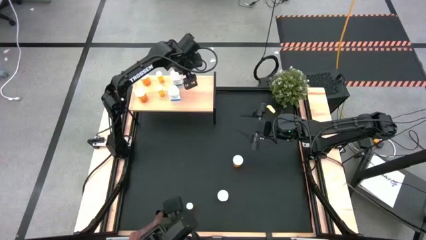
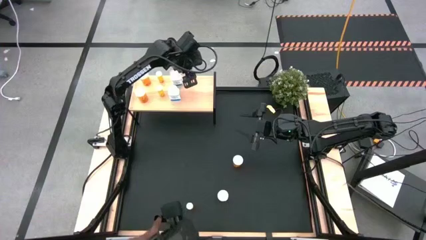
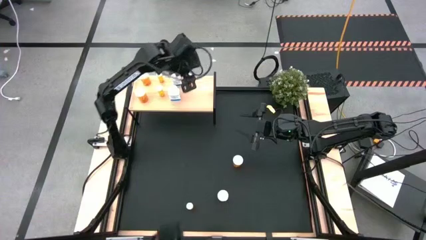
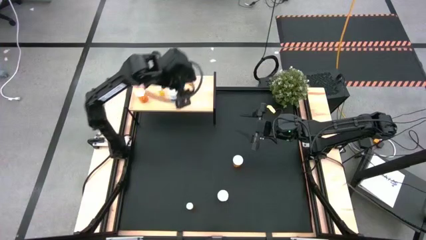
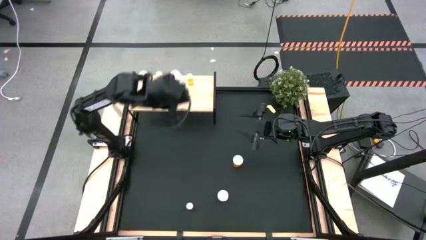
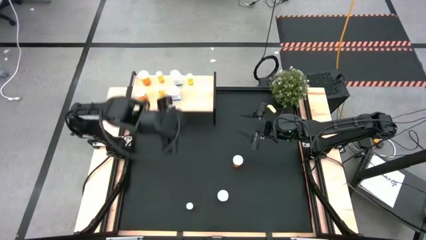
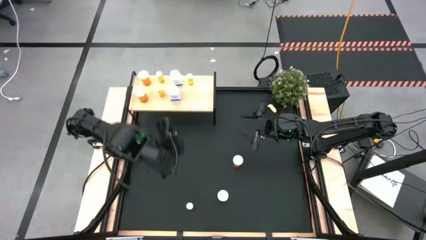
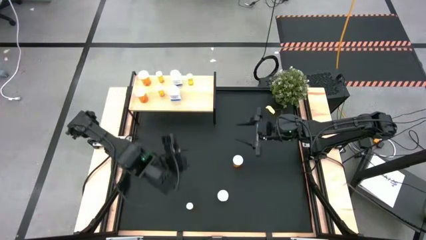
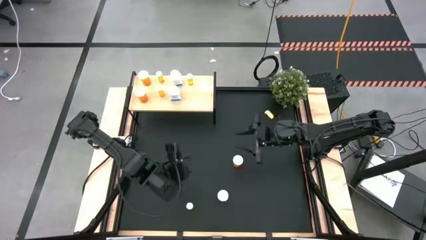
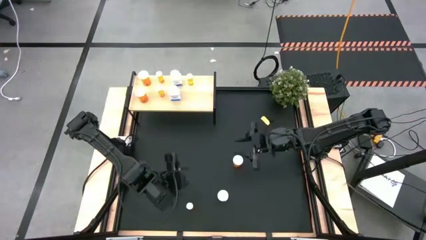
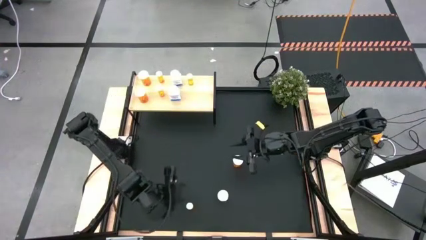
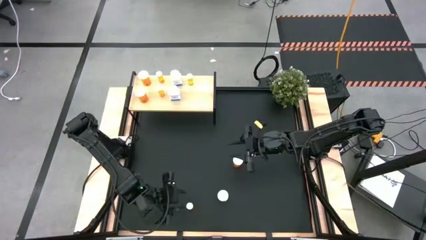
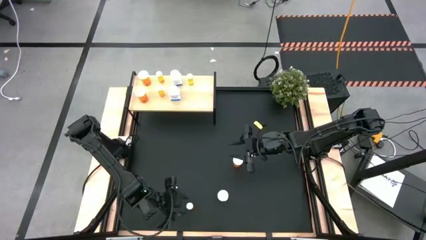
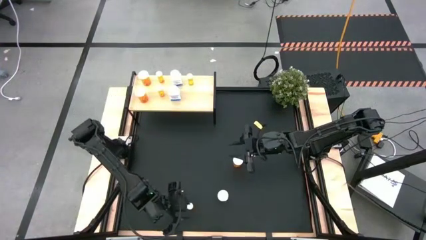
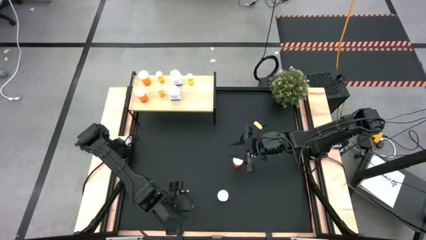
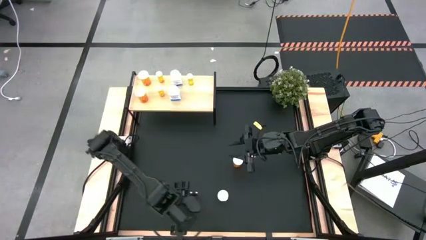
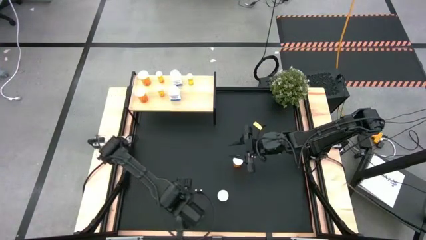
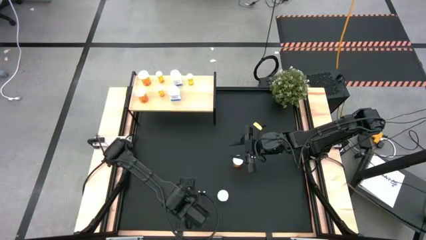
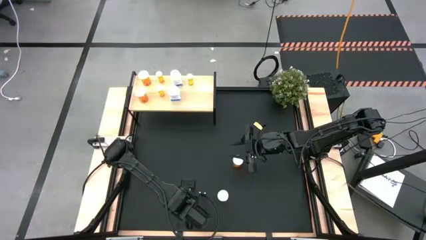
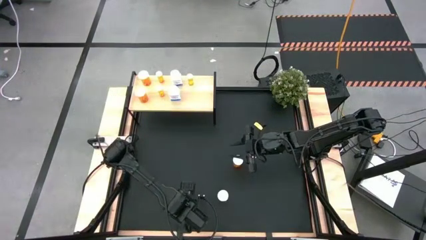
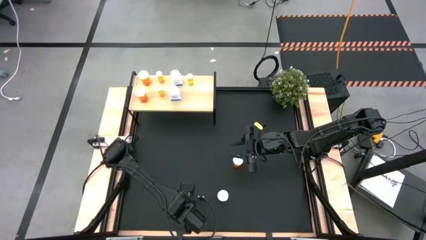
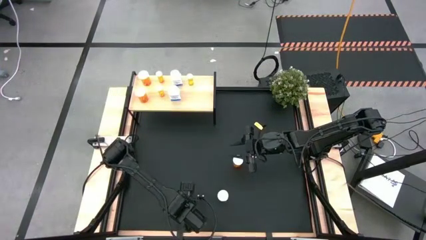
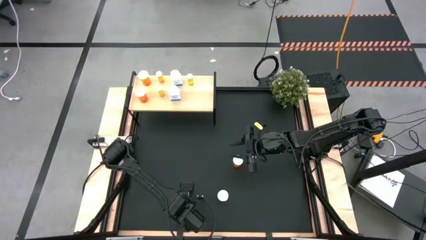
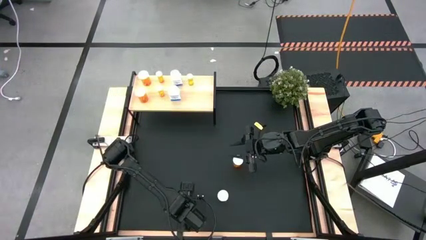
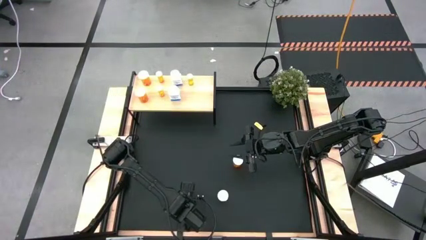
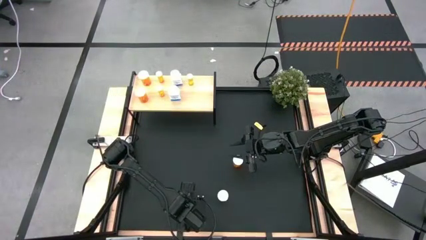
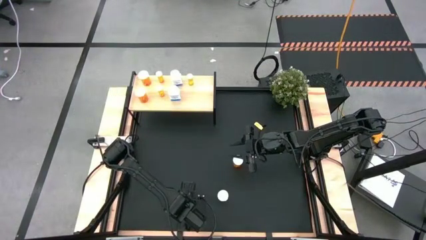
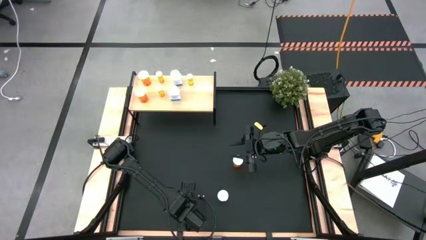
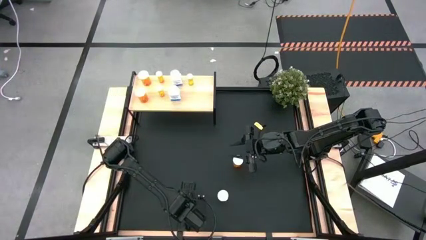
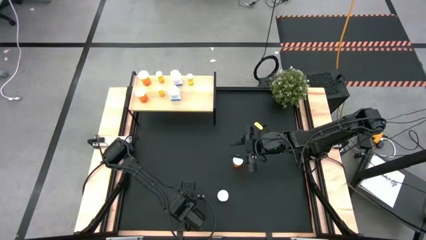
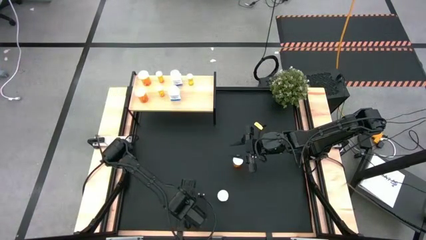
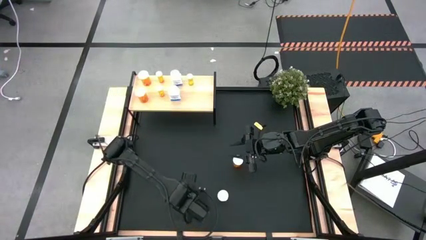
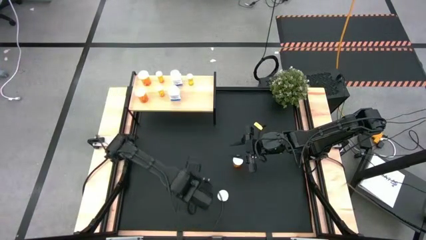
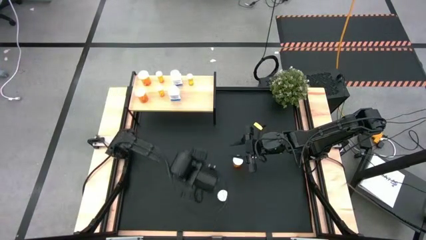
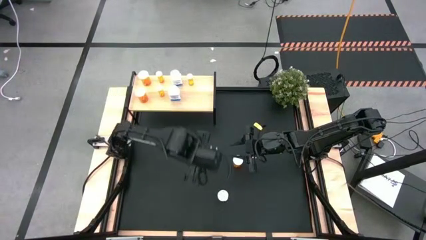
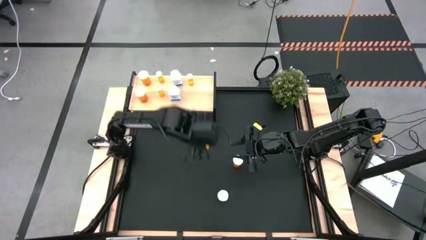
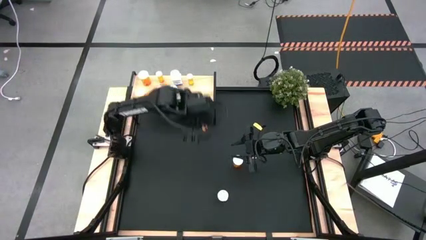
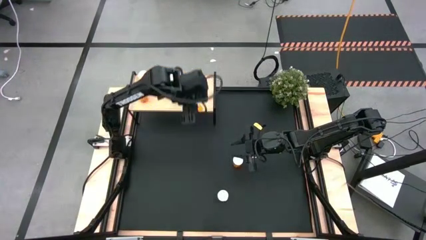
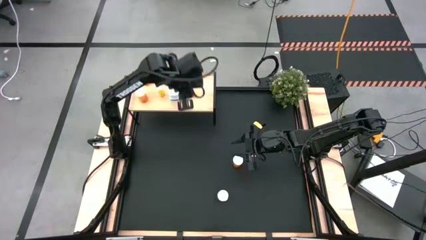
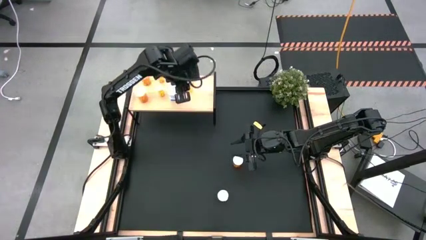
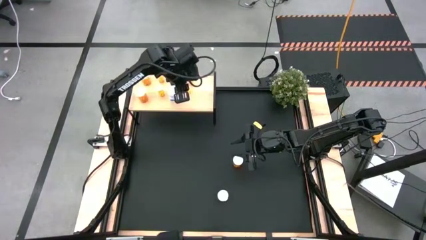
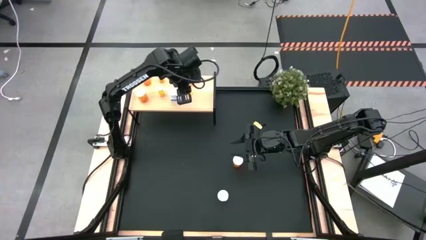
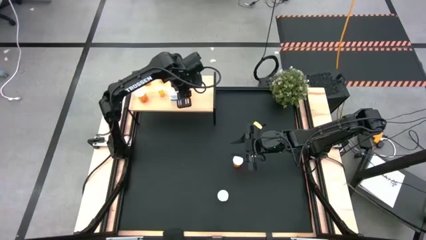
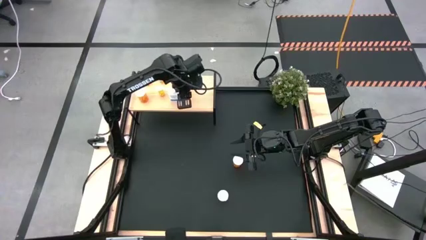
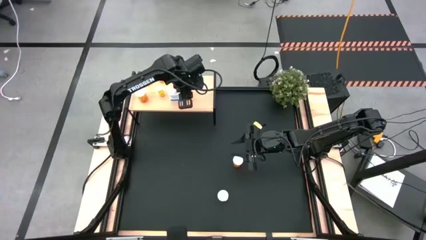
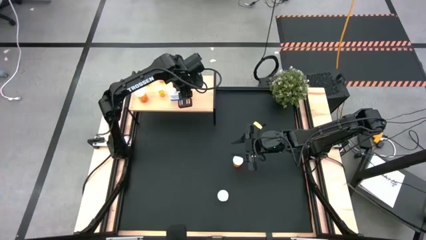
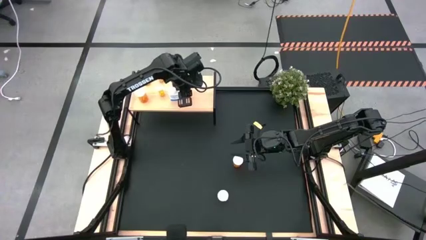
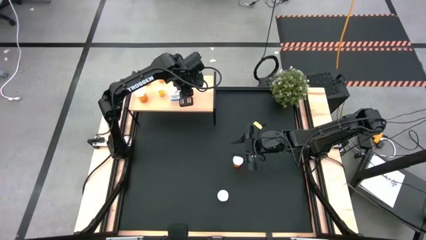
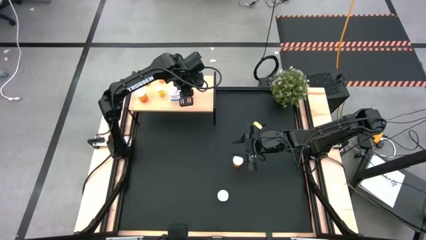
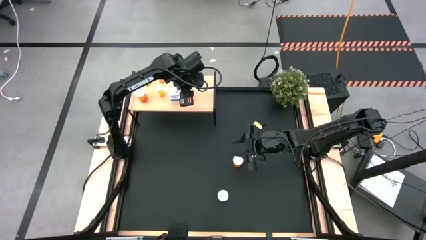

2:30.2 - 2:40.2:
Task: Pick and place medicine bottles onto shelf by color
Put the small orange pill bottle on the shelf aligned with the other small orange pill bottle
